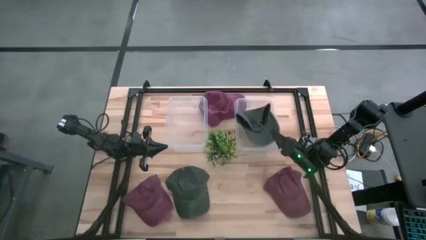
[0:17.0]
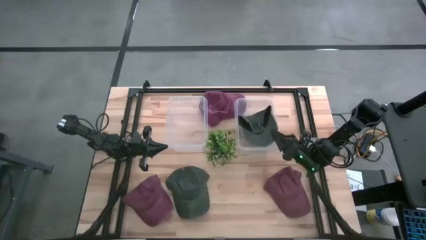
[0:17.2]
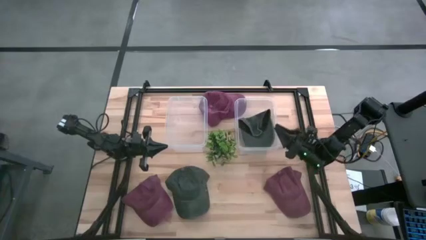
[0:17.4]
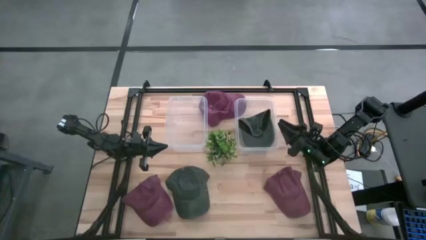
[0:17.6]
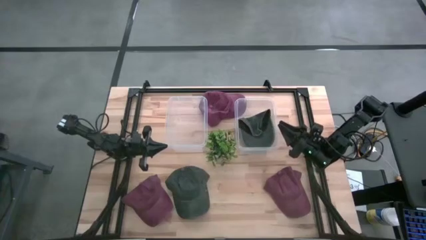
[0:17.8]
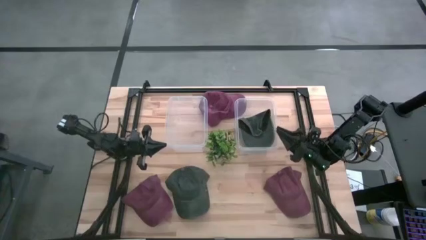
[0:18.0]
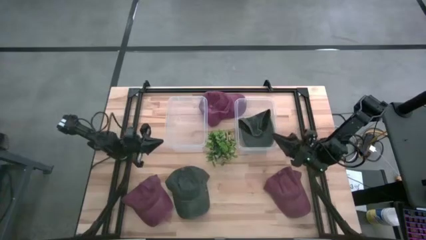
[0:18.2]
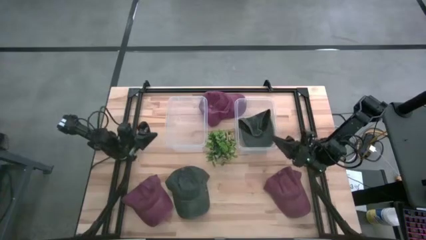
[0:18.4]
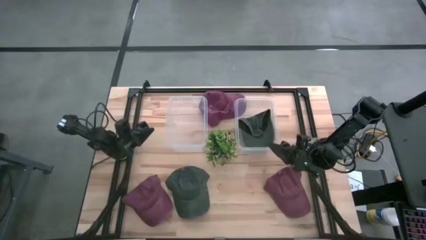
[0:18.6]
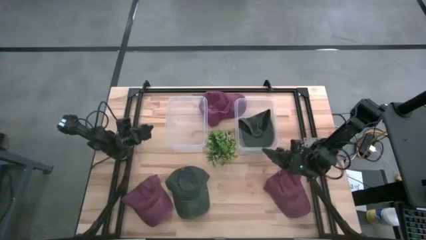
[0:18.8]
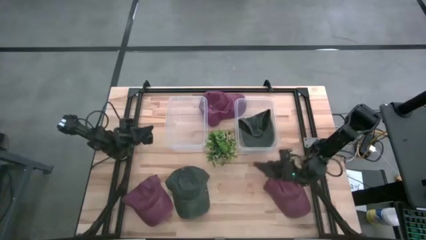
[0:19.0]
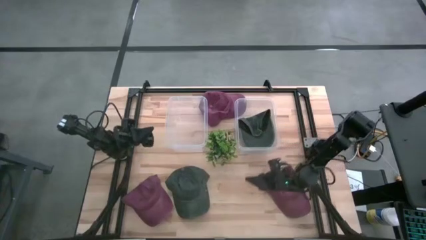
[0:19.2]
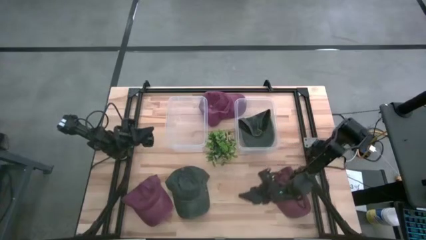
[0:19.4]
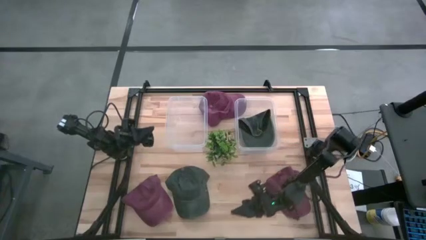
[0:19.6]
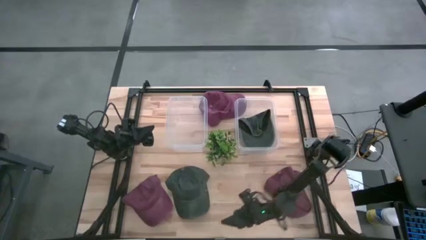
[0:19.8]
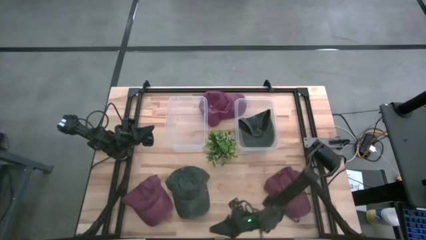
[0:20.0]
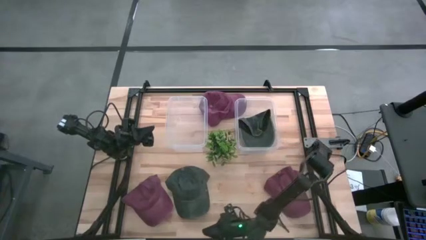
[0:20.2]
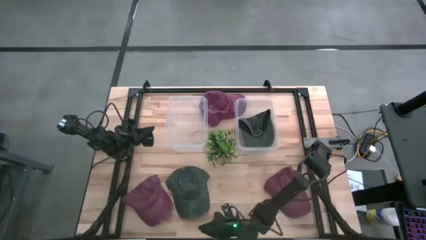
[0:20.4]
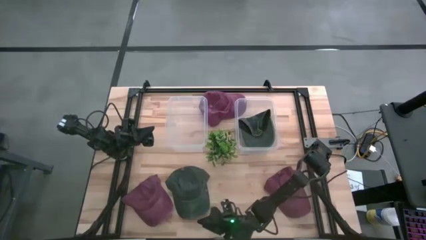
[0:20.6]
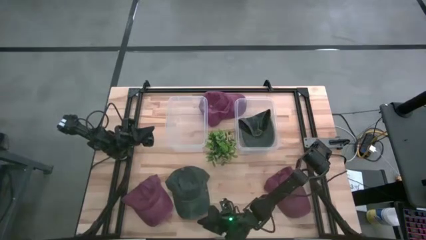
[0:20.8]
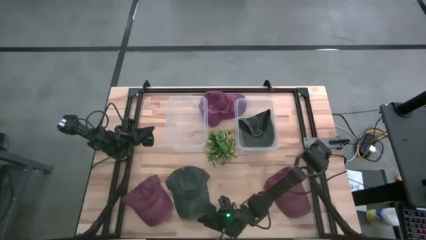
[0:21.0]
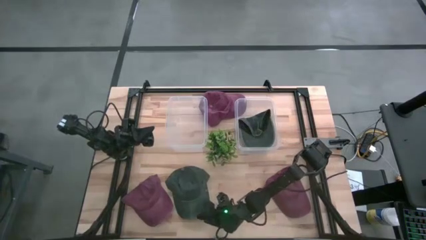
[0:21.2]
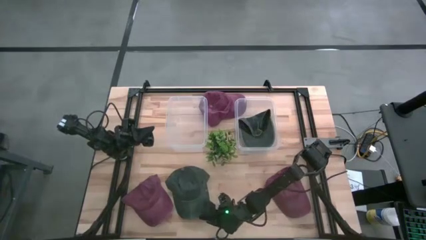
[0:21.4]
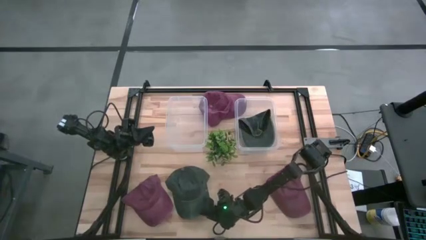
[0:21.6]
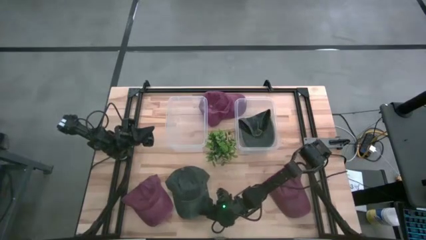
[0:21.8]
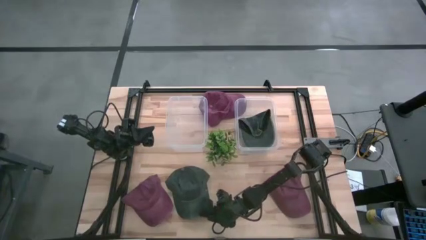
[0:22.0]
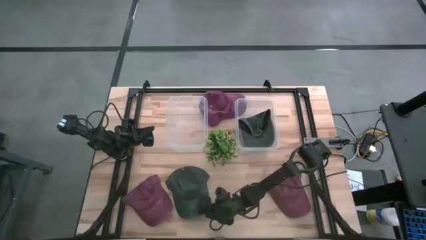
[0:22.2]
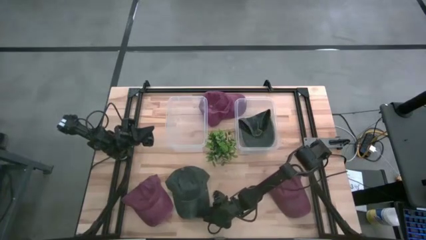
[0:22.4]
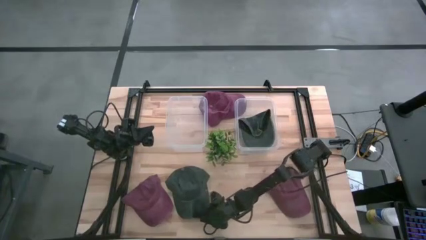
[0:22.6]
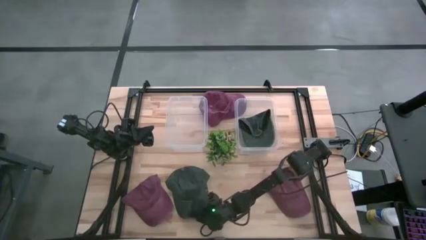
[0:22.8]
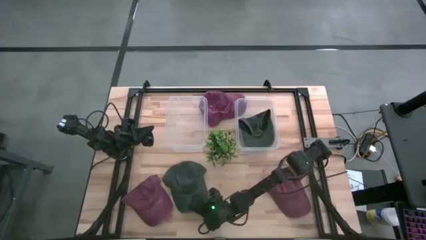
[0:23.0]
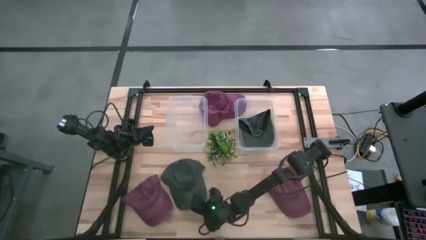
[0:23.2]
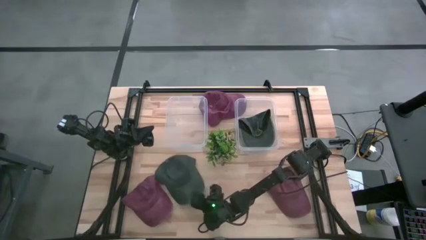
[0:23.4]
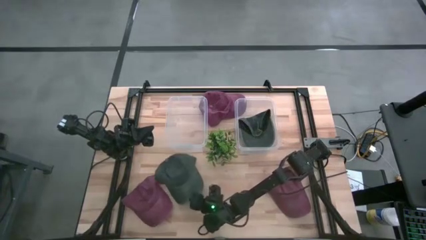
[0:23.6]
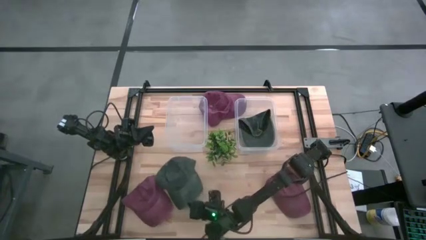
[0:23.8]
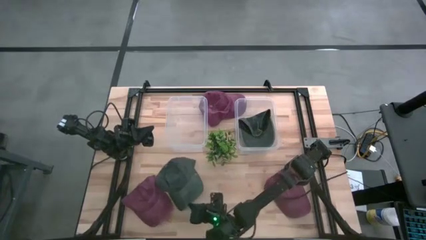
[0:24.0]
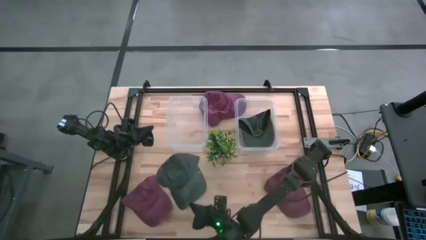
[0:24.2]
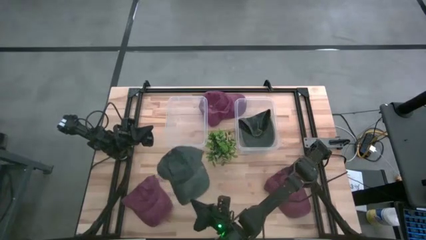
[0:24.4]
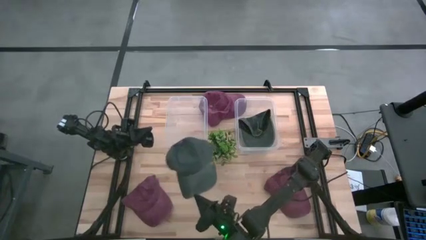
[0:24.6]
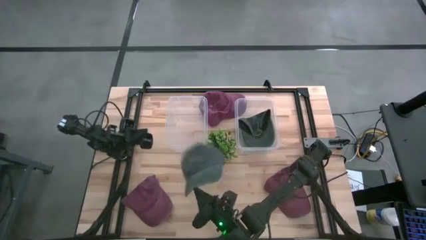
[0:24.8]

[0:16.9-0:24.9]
Task: Pick & Place hat
Put the black cap into the right transparent bin

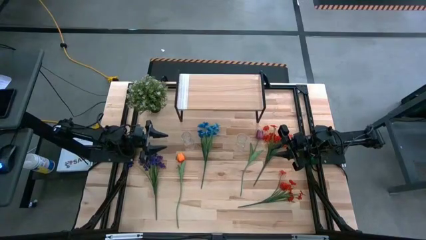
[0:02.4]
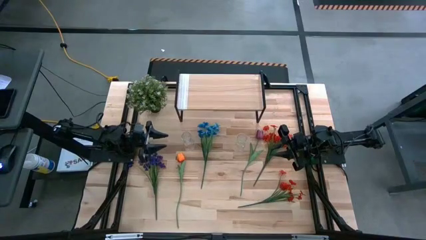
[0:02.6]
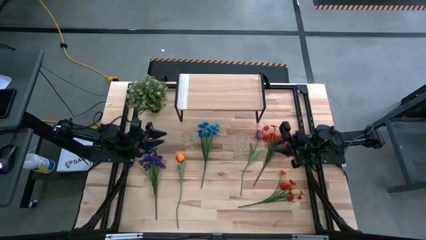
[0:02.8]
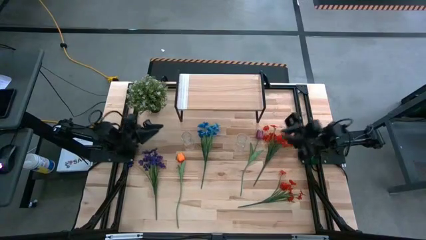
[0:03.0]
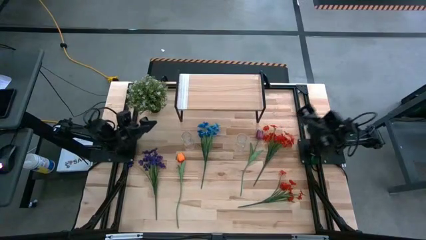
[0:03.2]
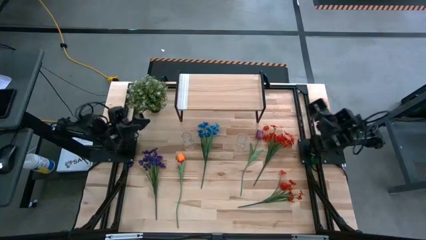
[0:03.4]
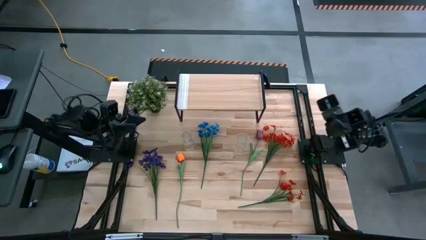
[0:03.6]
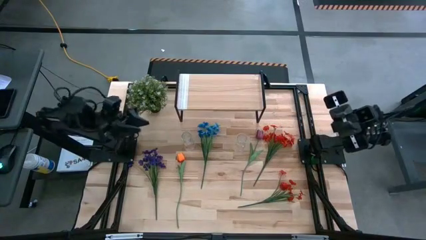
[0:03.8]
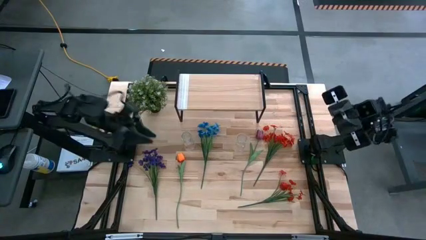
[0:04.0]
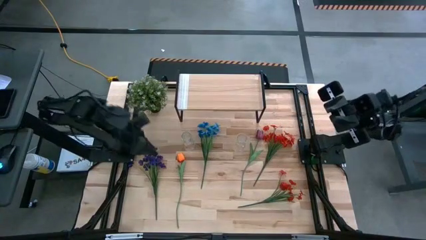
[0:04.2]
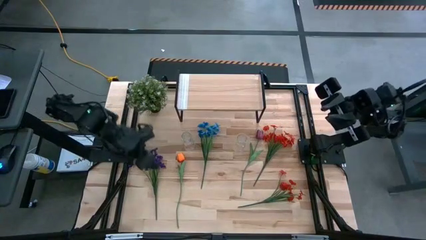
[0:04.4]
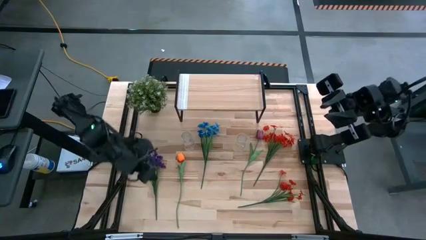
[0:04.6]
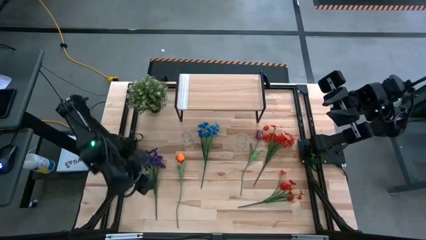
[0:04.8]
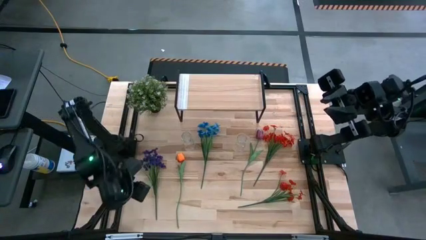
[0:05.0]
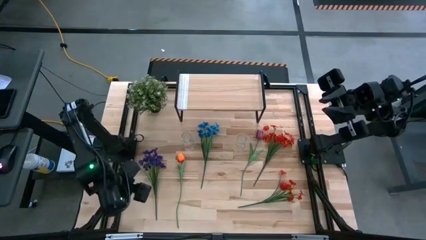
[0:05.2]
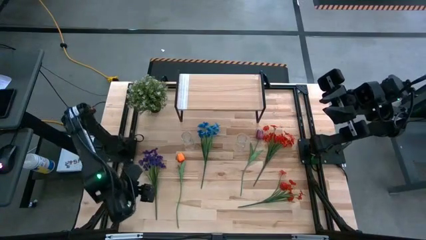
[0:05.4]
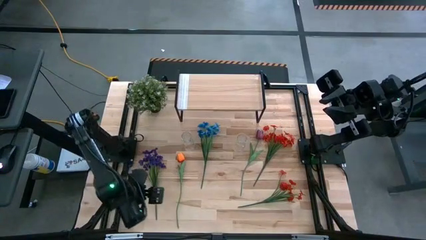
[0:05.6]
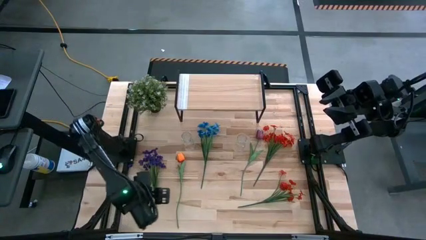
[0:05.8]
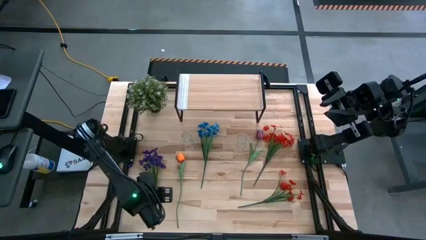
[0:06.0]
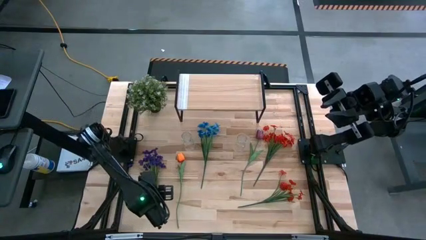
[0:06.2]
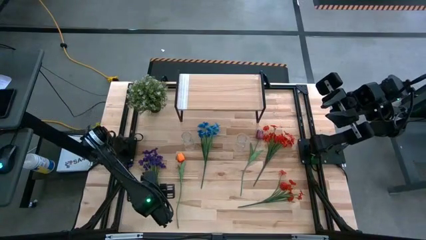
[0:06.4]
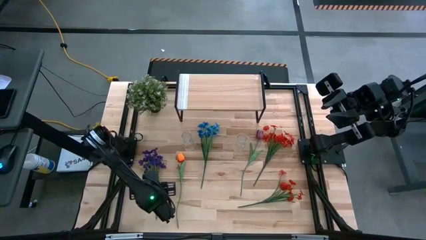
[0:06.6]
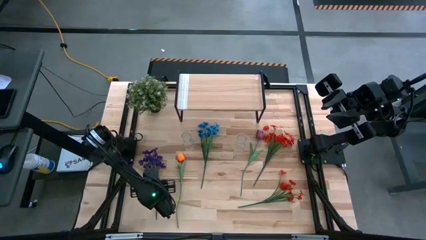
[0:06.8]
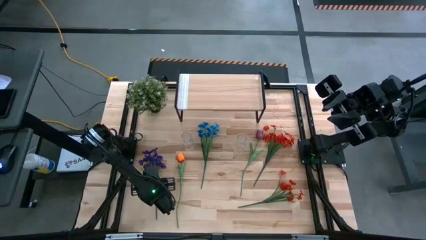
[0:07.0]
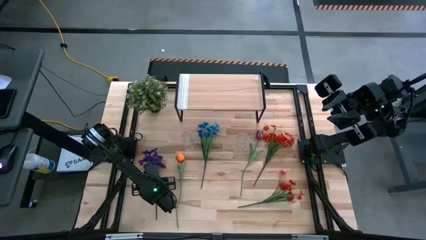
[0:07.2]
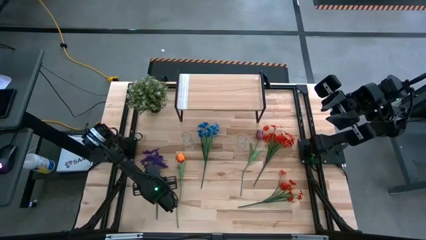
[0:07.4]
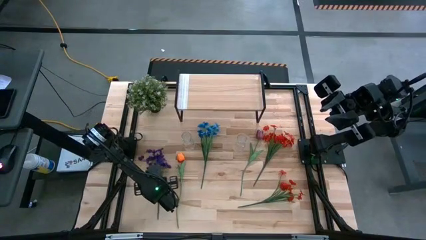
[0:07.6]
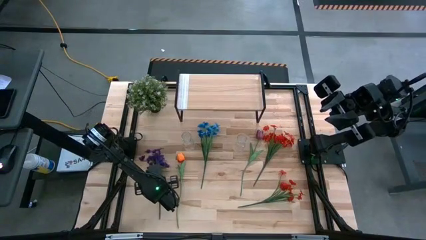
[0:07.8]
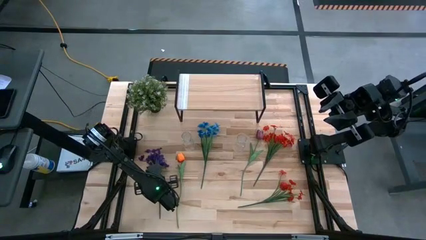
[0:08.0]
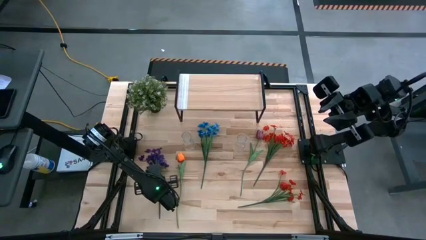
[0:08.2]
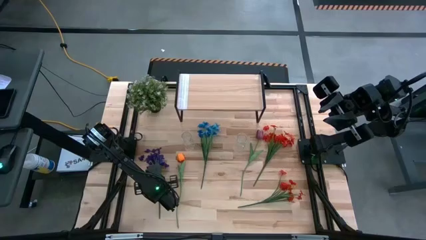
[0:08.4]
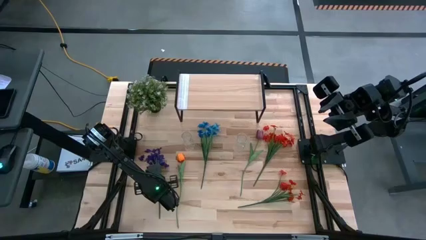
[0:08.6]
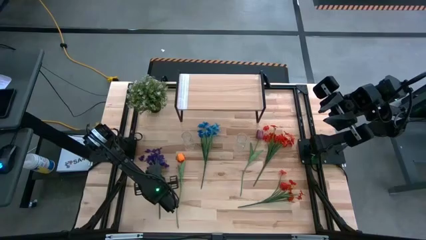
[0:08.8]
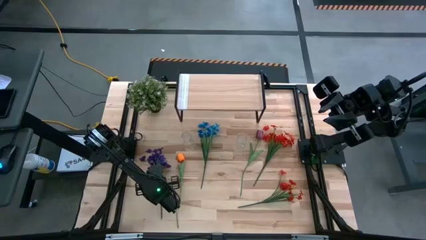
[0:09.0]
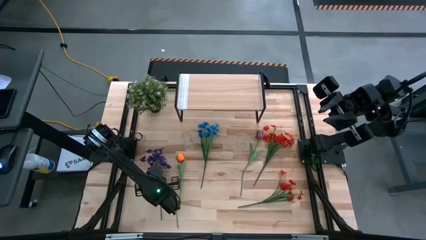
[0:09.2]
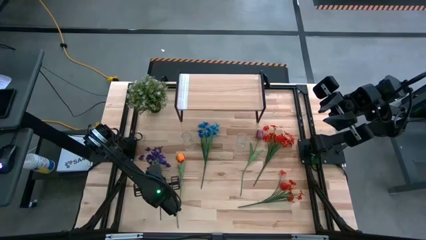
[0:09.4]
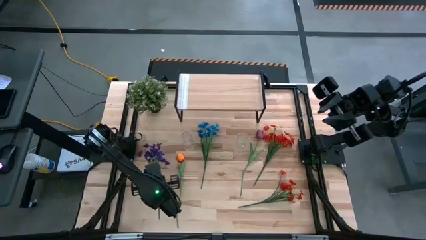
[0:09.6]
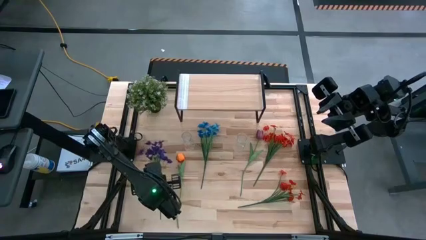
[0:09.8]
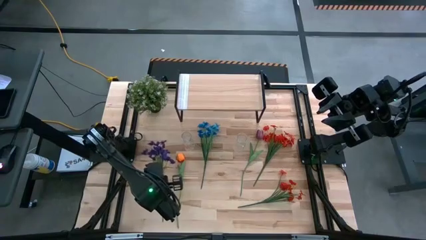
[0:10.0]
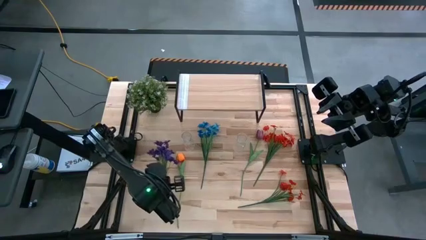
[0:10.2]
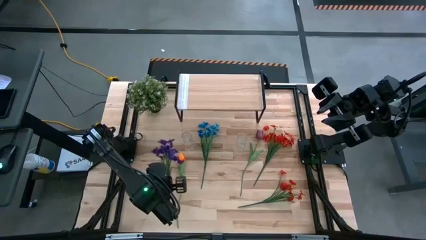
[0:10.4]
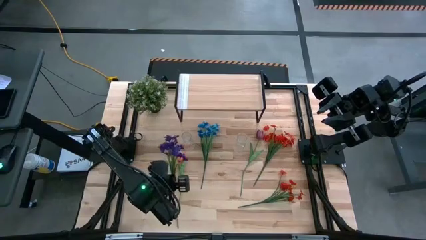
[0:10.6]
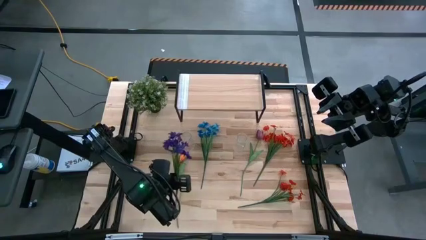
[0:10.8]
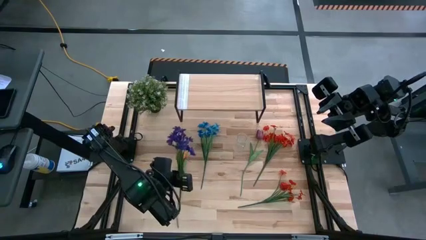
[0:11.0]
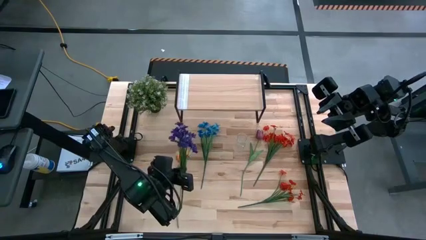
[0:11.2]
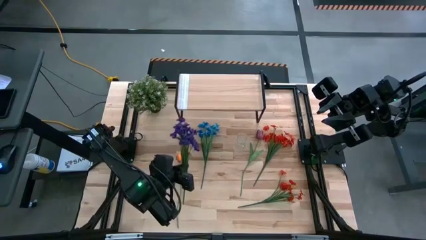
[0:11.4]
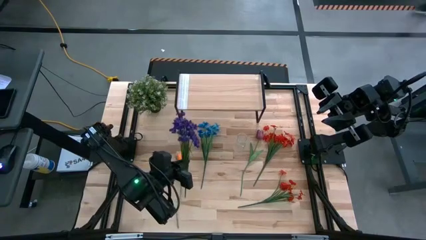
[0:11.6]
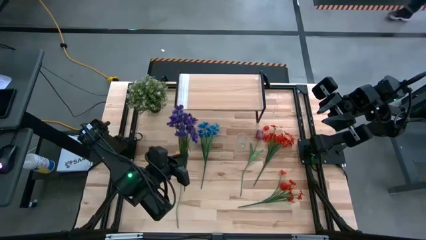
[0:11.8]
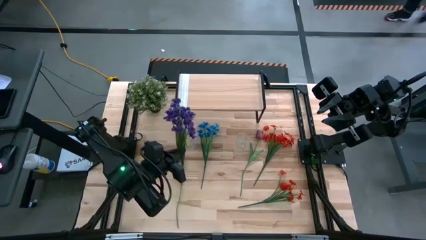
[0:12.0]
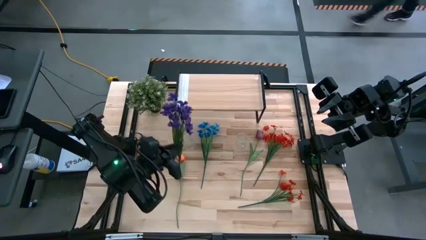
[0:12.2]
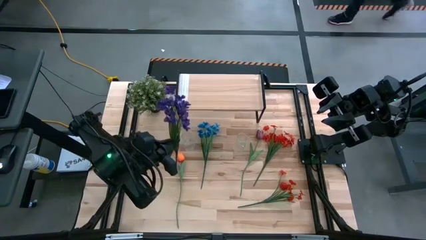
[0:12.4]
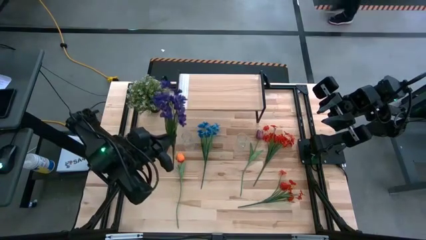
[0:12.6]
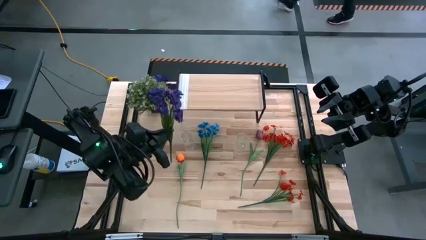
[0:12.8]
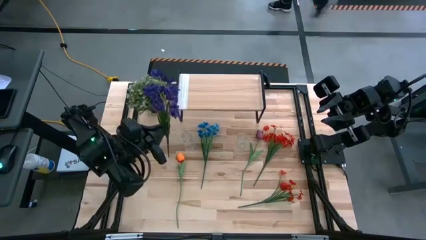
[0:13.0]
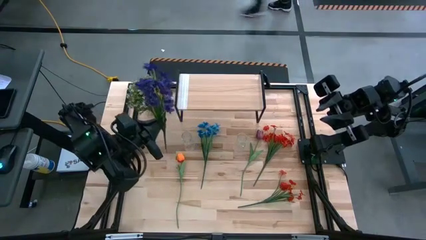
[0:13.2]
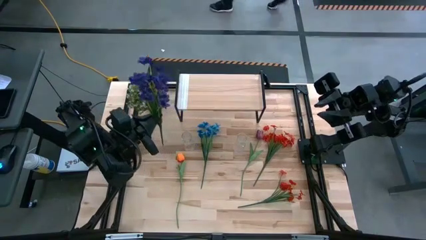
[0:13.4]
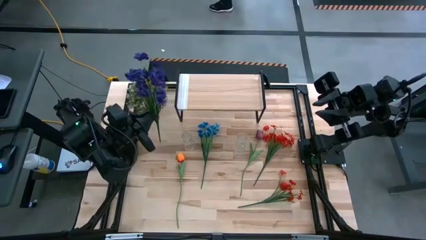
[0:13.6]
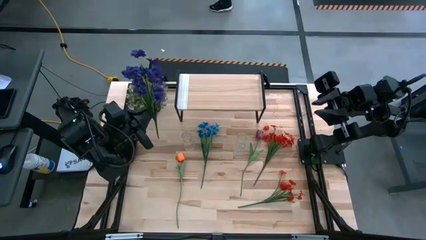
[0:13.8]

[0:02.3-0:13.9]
Task: Pick and place flowers into a vace then onto a shelf
Put the violet flowers into the left transparent vase
